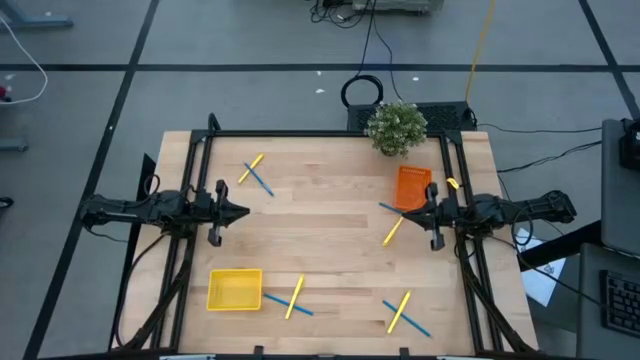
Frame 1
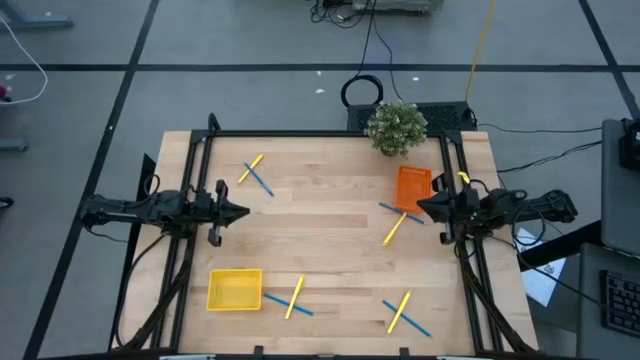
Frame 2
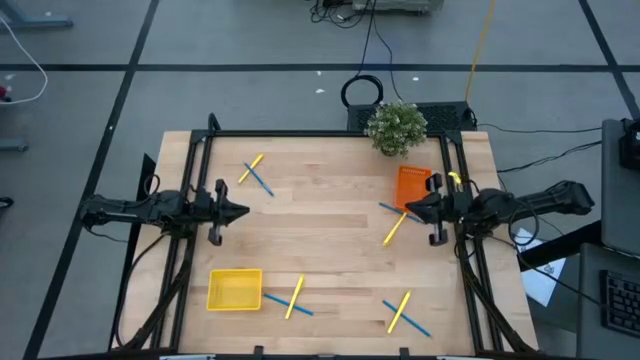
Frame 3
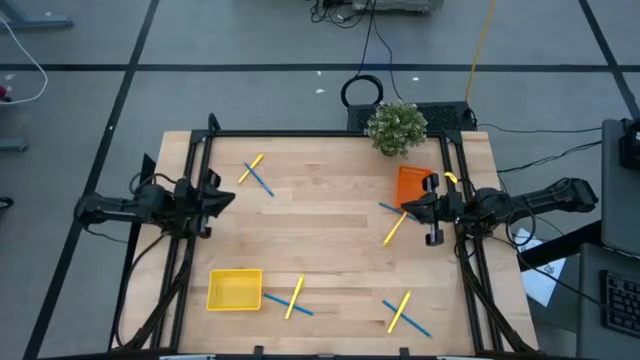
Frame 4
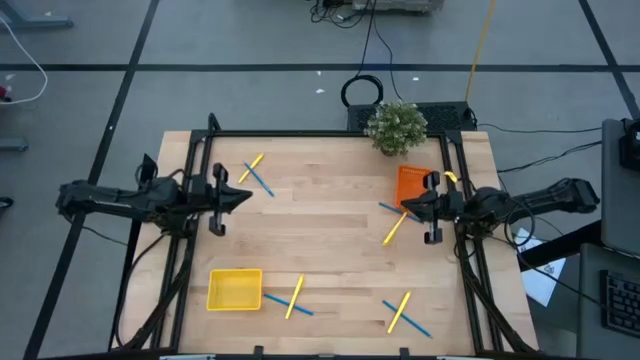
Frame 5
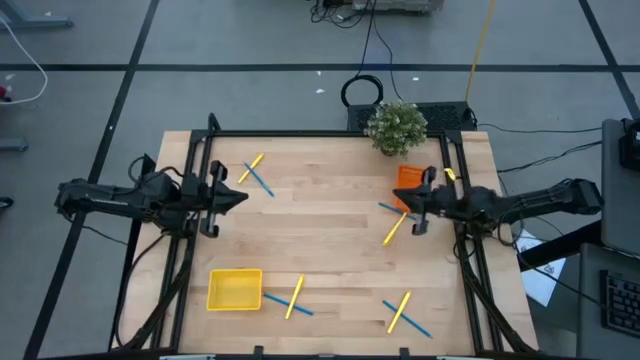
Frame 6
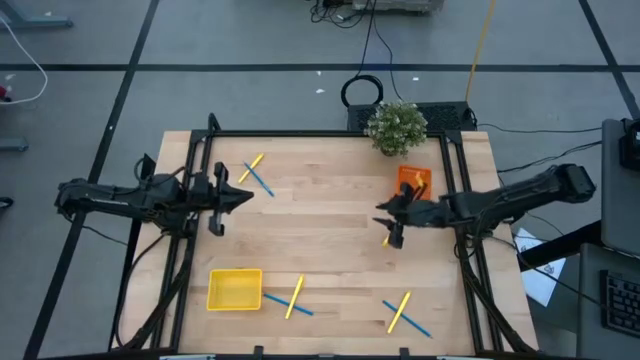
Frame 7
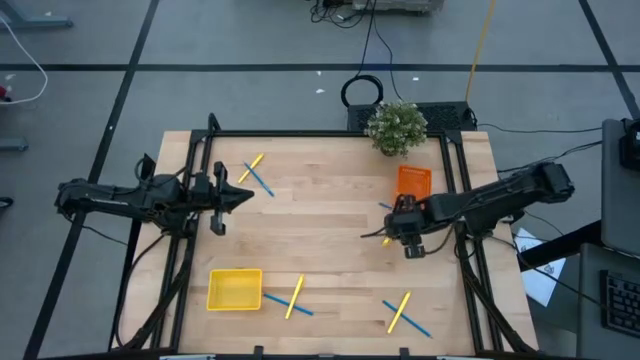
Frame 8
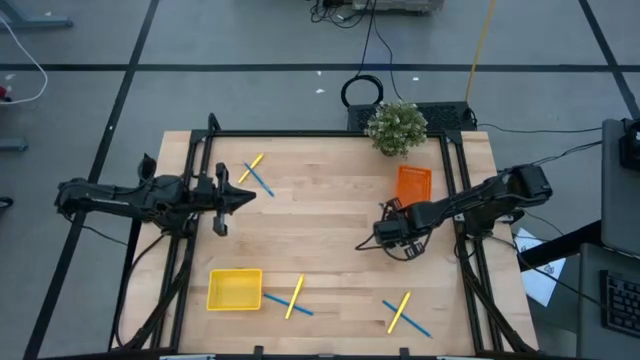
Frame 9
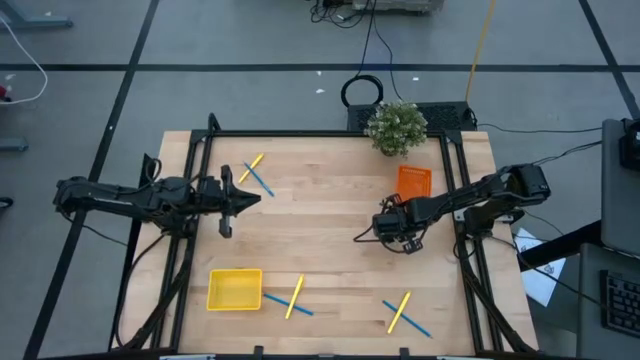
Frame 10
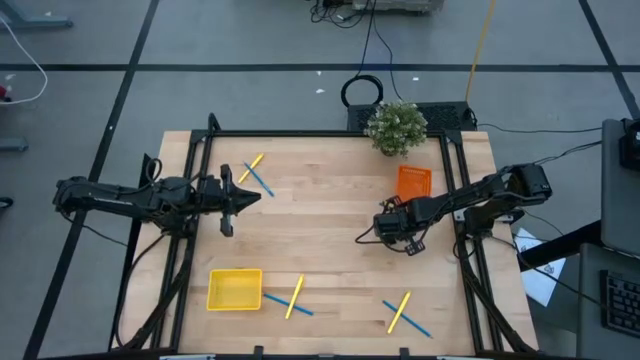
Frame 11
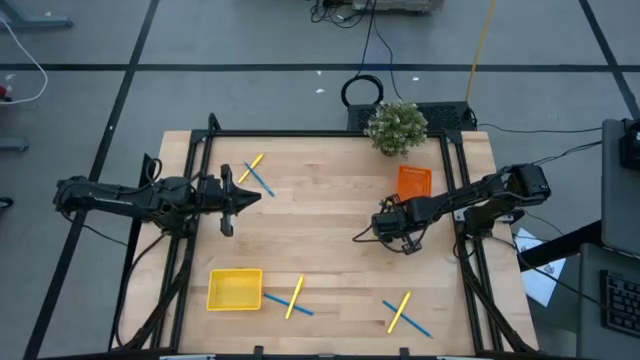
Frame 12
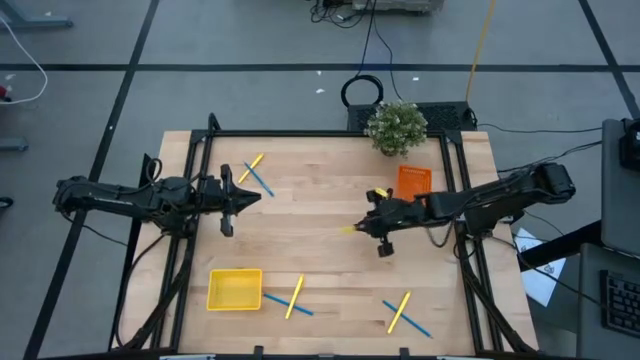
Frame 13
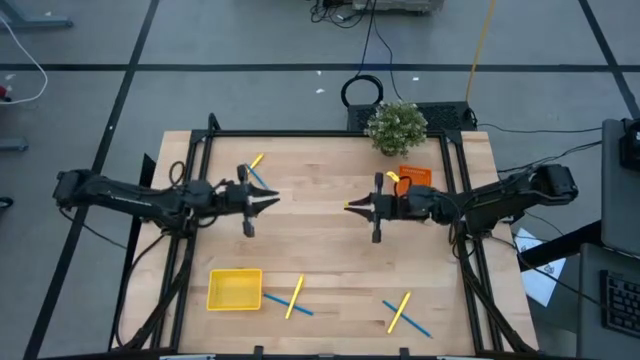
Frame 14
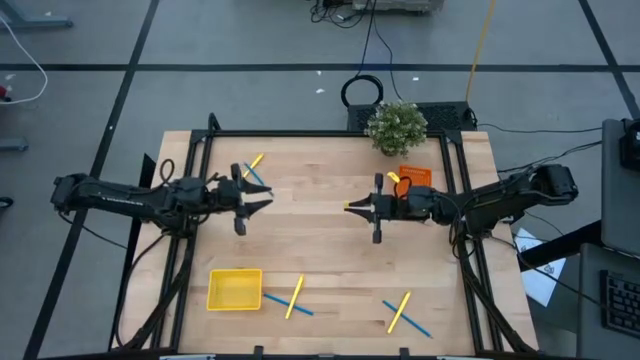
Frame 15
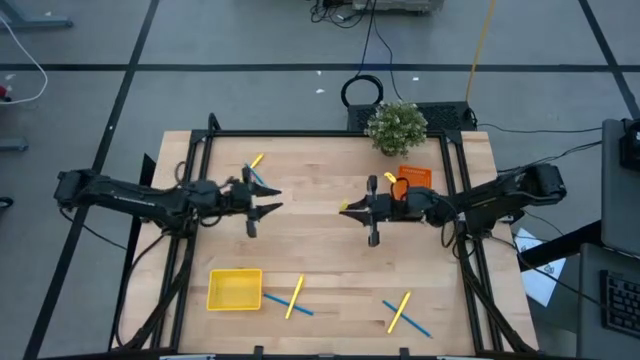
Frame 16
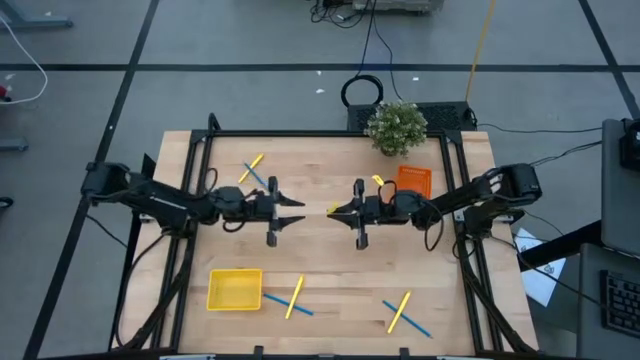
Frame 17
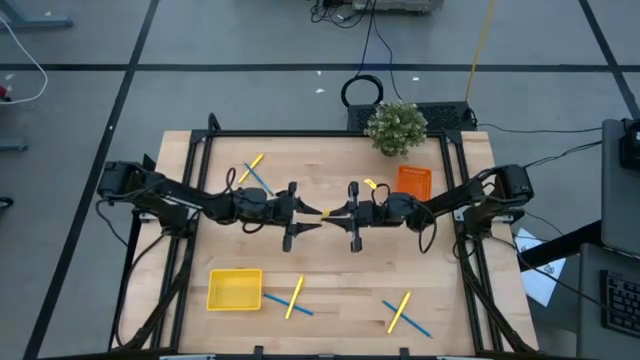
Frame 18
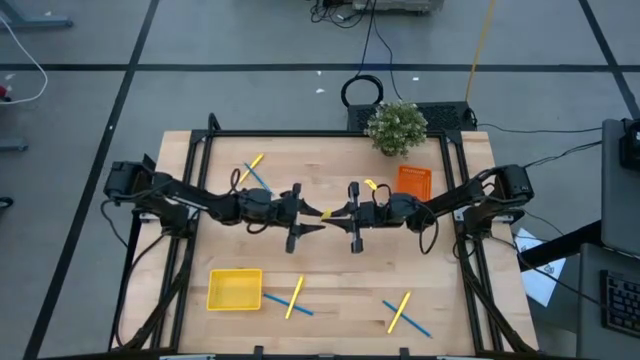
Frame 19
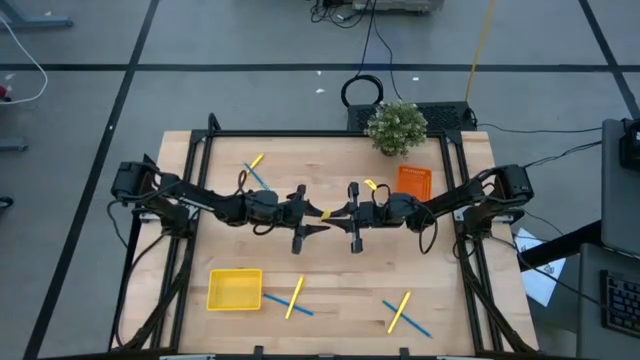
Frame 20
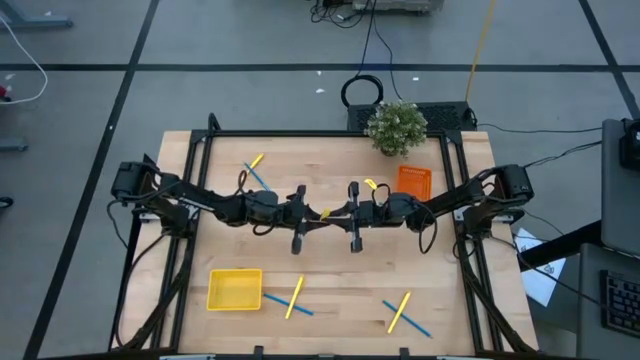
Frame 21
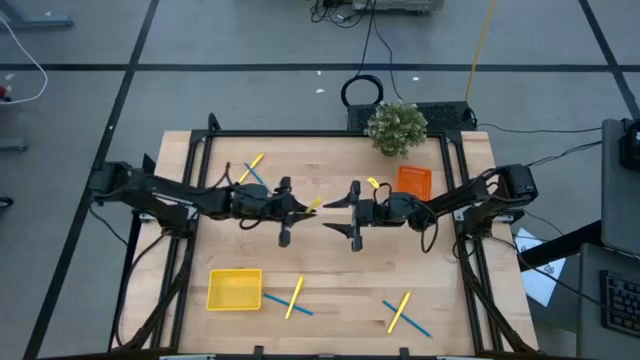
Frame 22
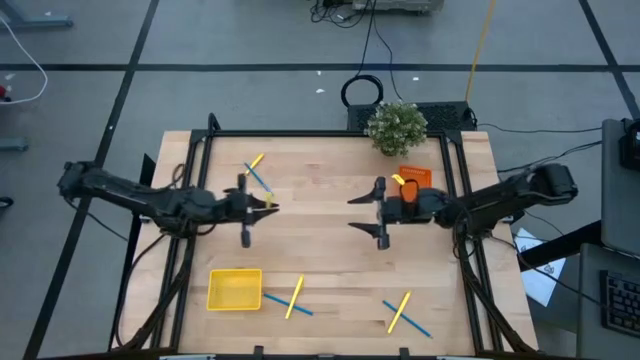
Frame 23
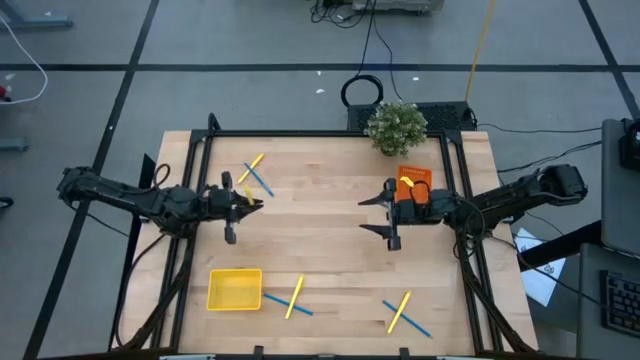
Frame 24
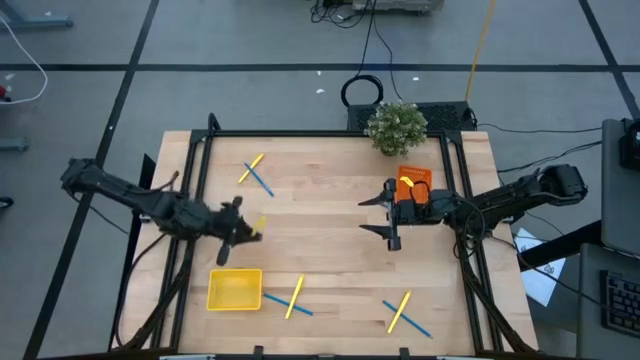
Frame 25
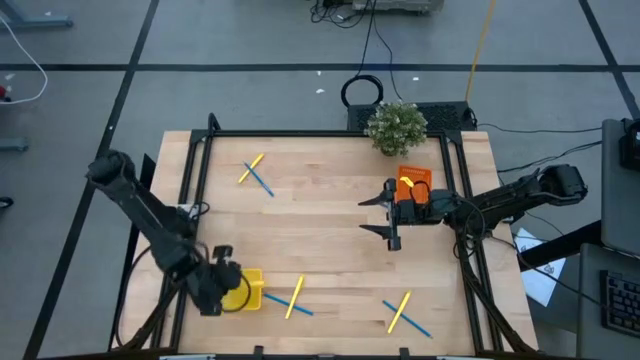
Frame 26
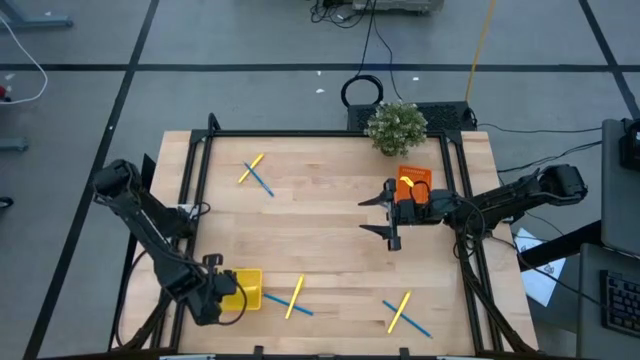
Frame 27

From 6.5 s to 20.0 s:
Task: Sort pens & pencils
Put the top right yellow ballpen into the yellow bin

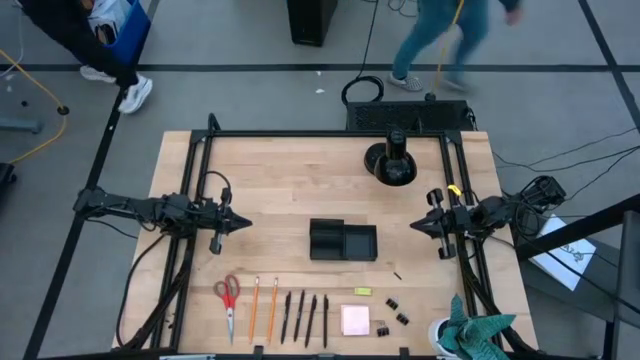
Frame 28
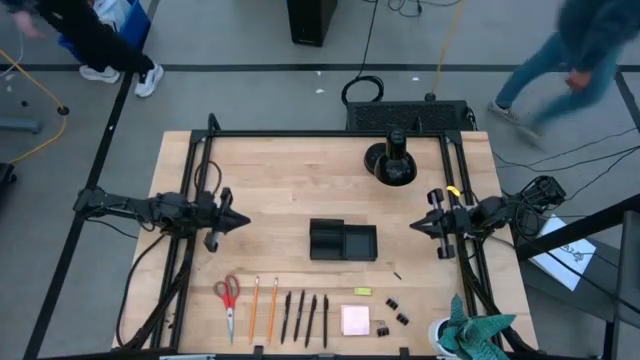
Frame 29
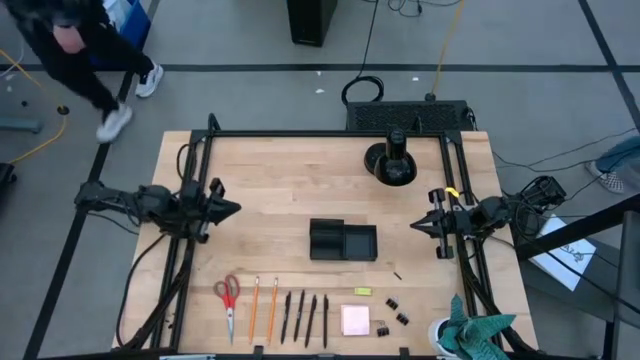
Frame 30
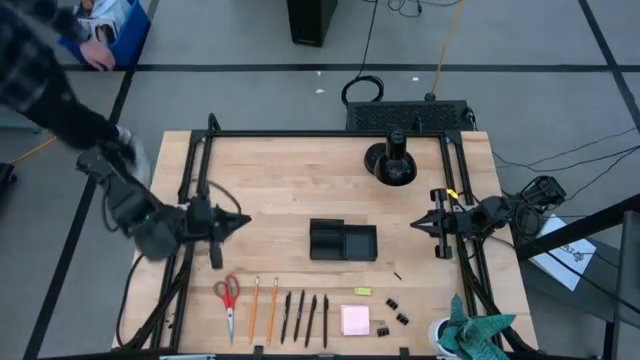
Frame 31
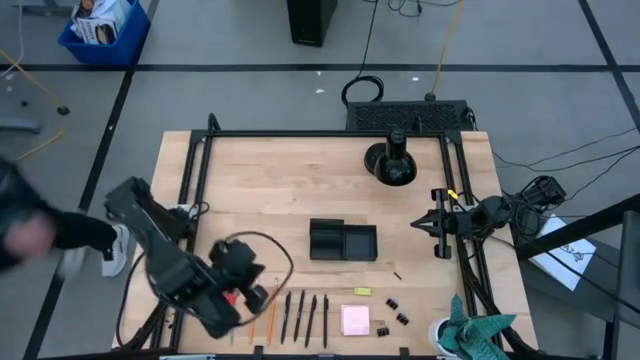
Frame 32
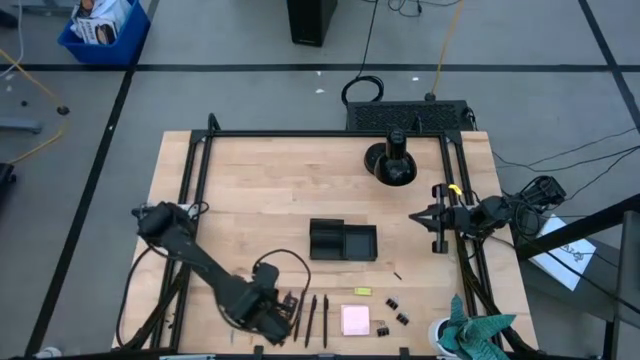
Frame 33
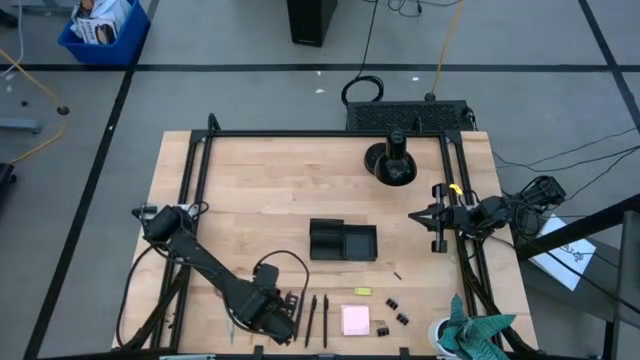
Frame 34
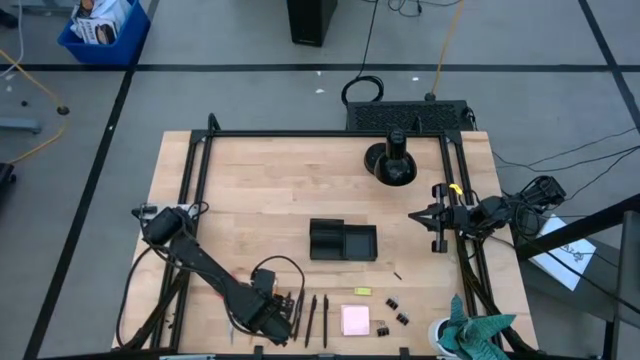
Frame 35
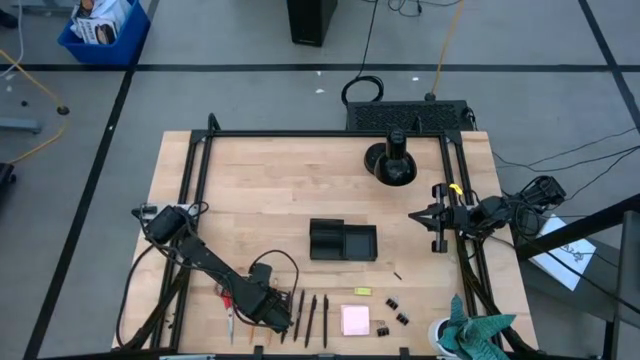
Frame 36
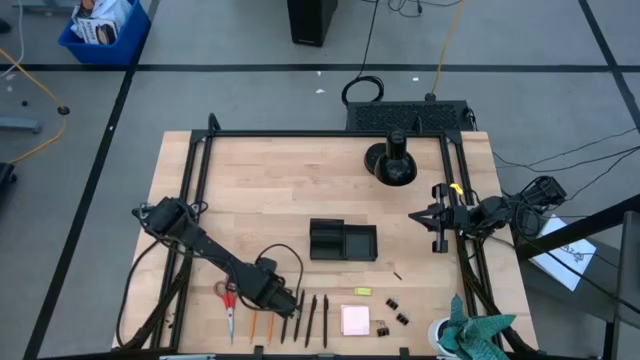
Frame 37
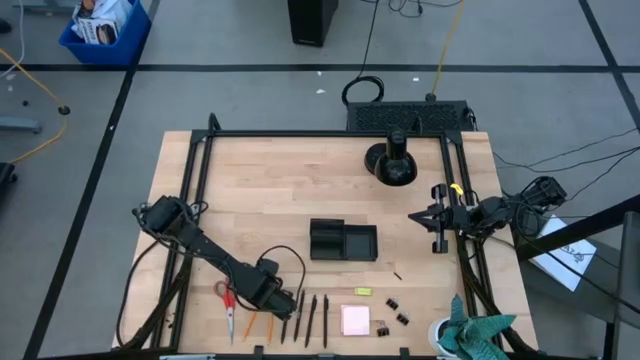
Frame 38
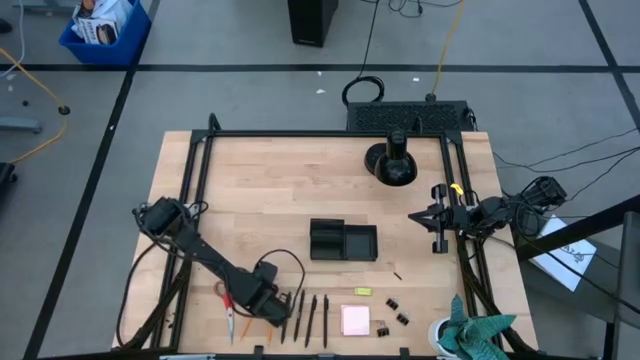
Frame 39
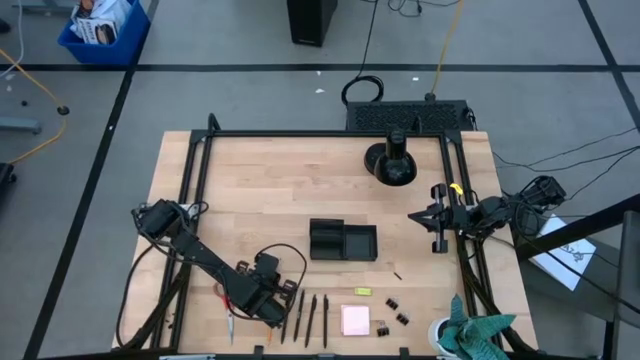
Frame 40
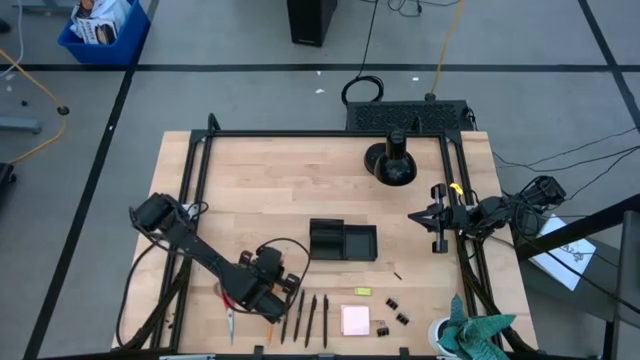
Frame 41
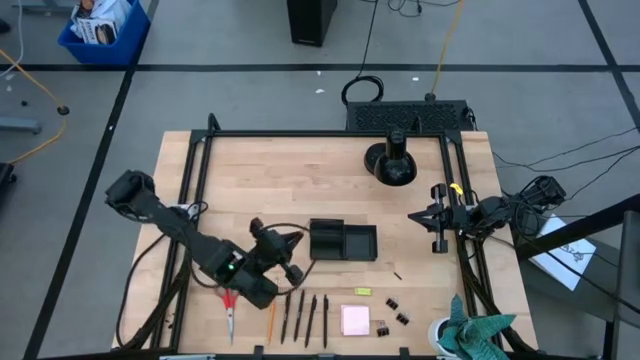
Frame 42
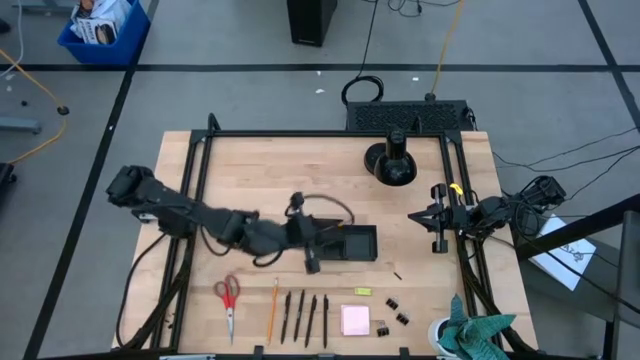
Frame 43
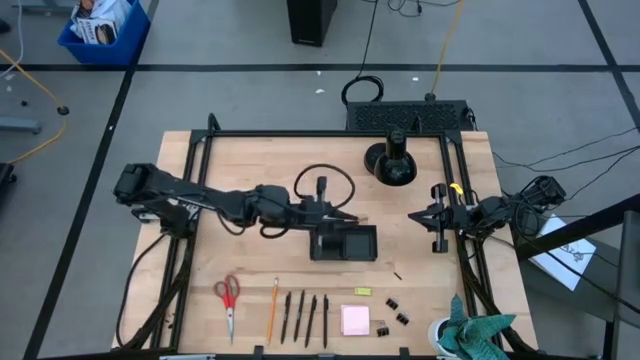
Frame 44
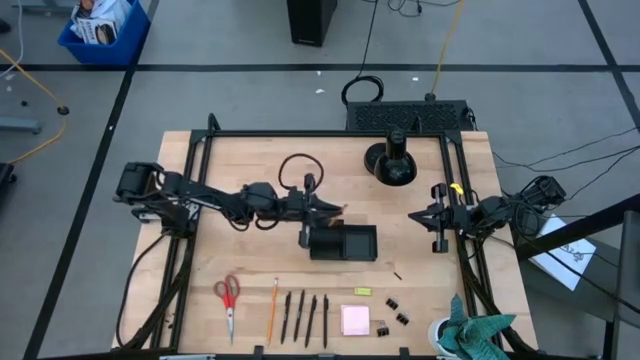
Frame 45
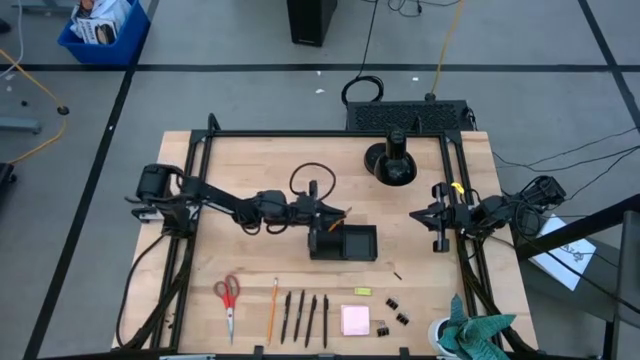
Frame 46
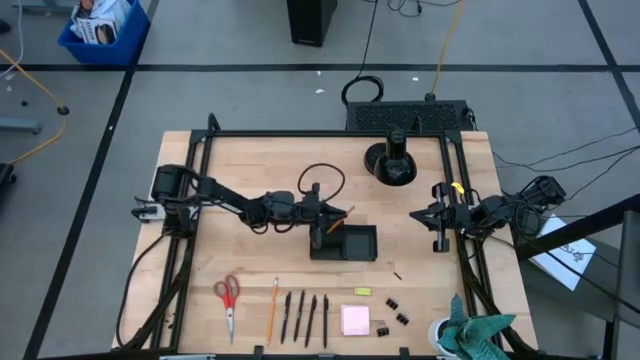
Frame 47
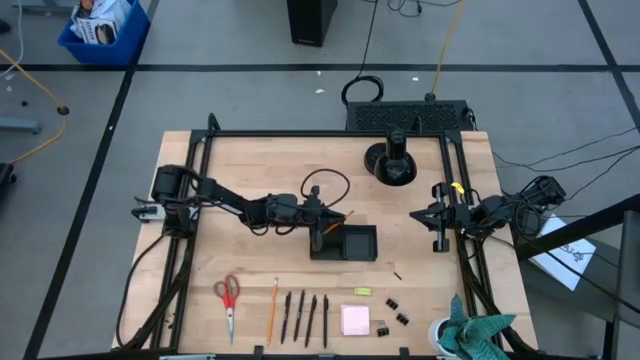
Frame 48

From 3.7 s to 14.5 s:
Task: Pick and place office supplies into organizer
Put the orange pencil into the black desk organizer
